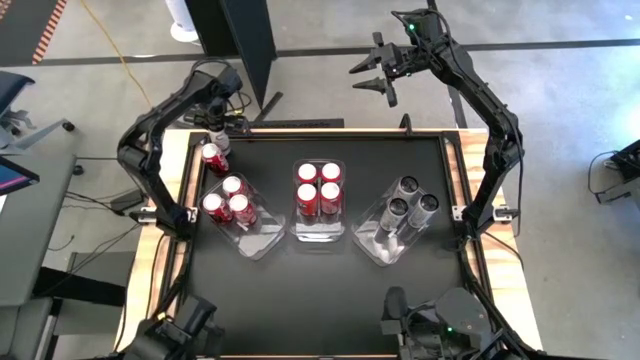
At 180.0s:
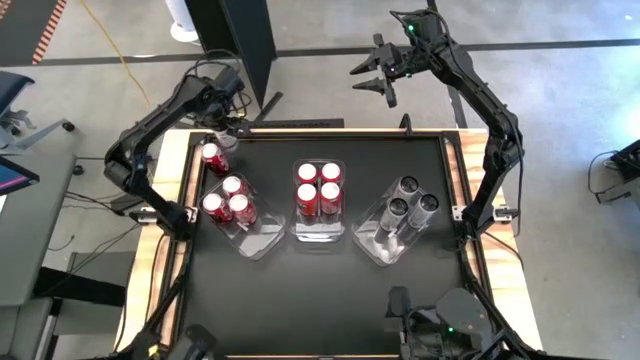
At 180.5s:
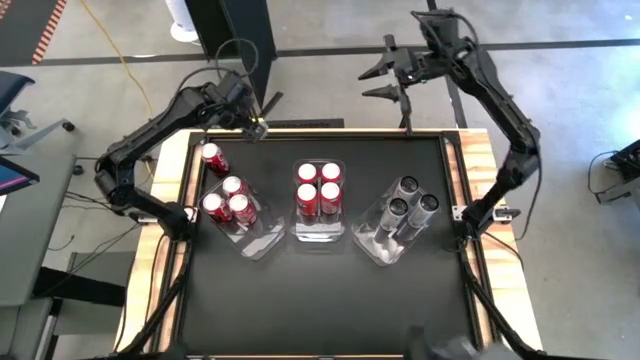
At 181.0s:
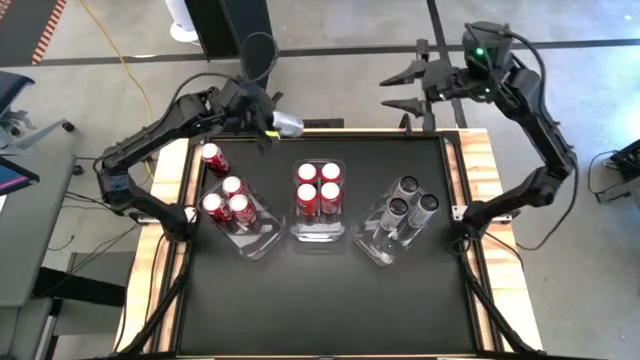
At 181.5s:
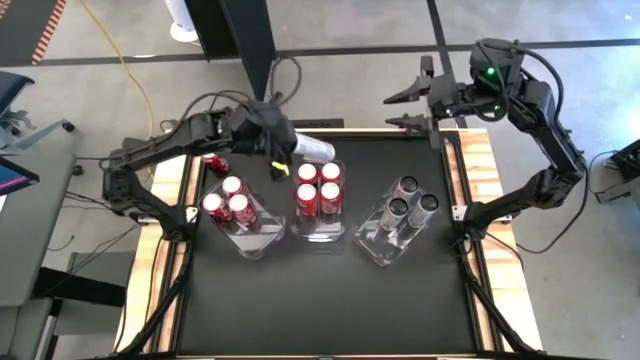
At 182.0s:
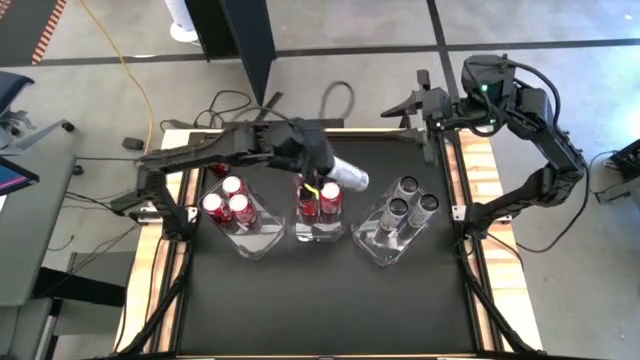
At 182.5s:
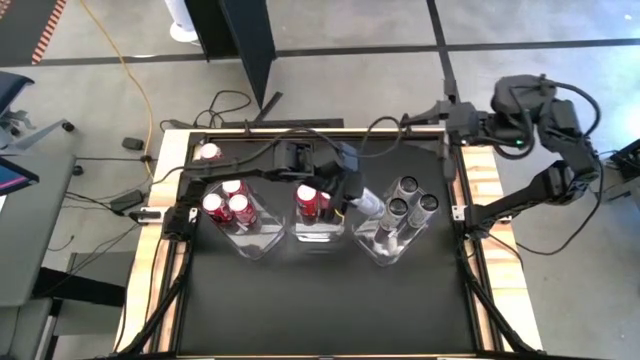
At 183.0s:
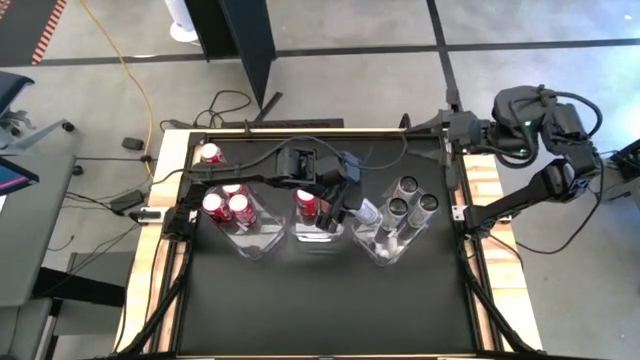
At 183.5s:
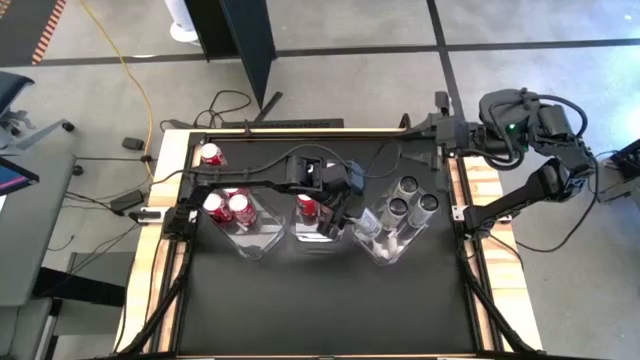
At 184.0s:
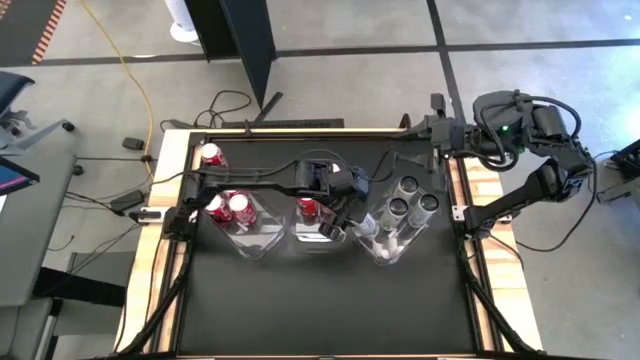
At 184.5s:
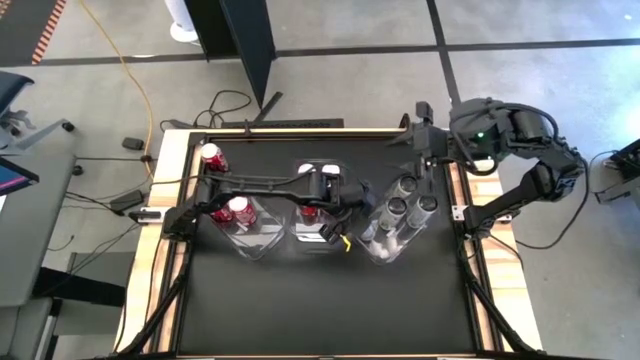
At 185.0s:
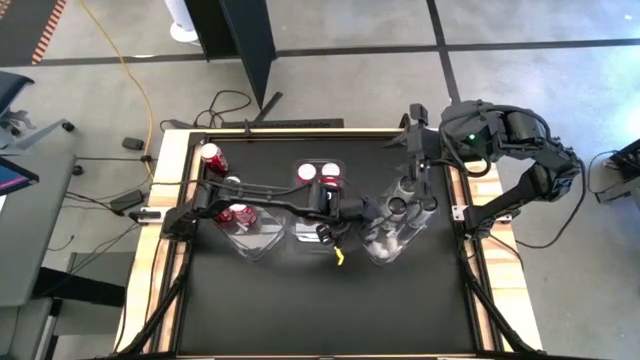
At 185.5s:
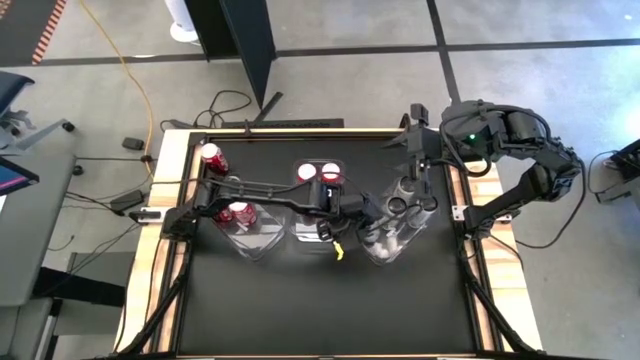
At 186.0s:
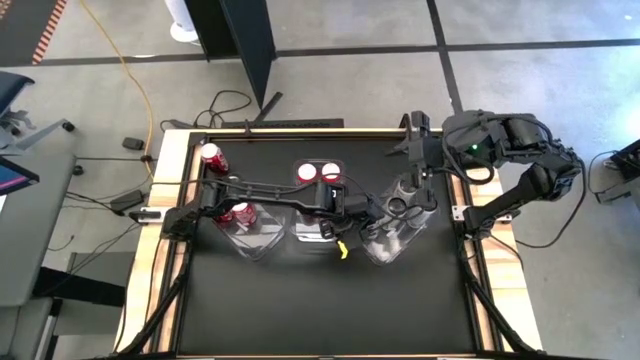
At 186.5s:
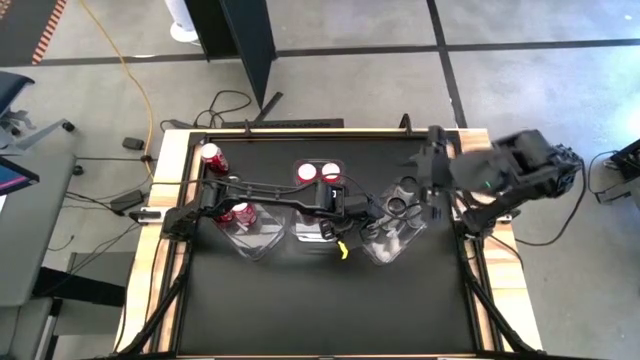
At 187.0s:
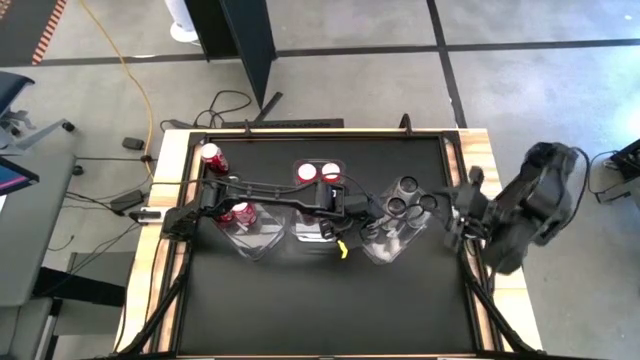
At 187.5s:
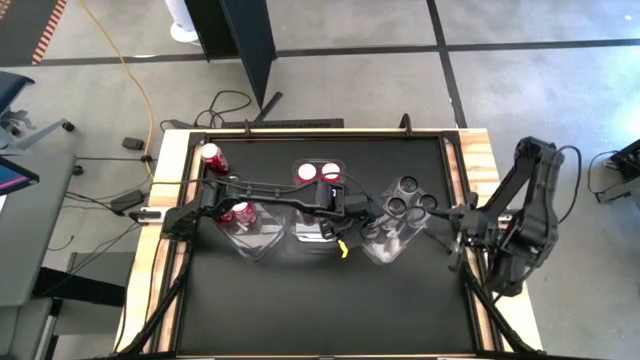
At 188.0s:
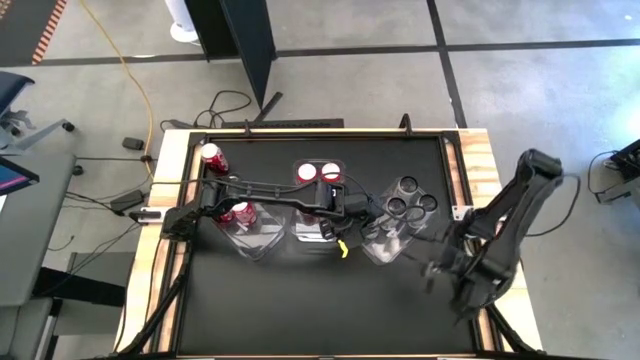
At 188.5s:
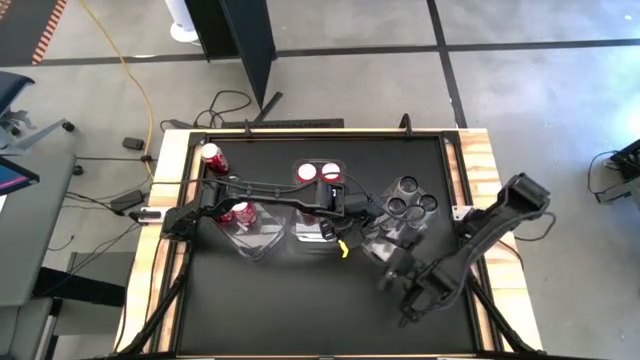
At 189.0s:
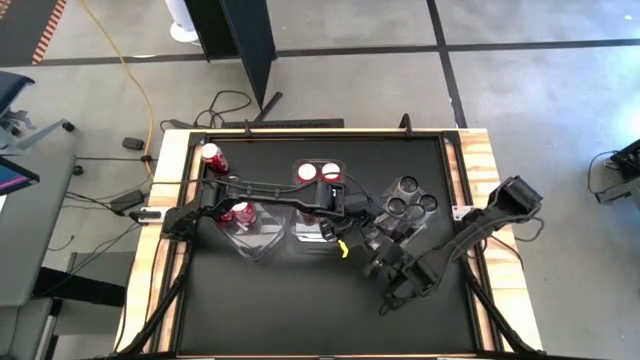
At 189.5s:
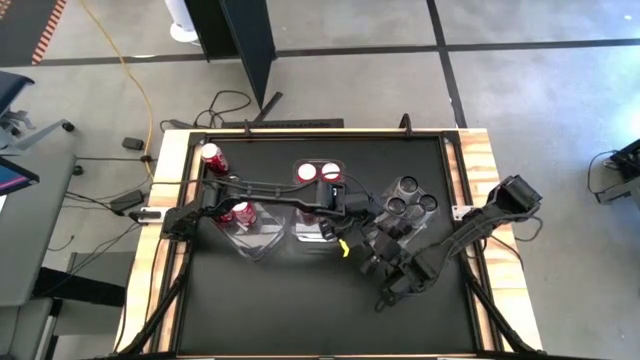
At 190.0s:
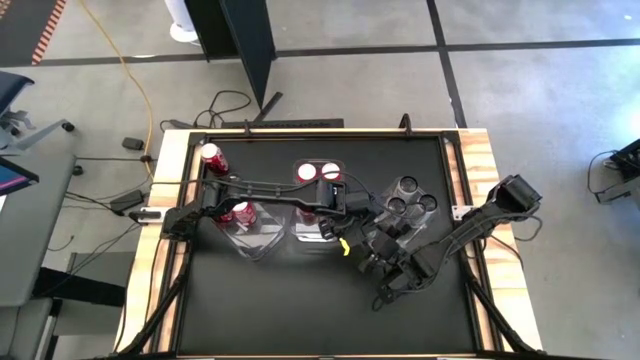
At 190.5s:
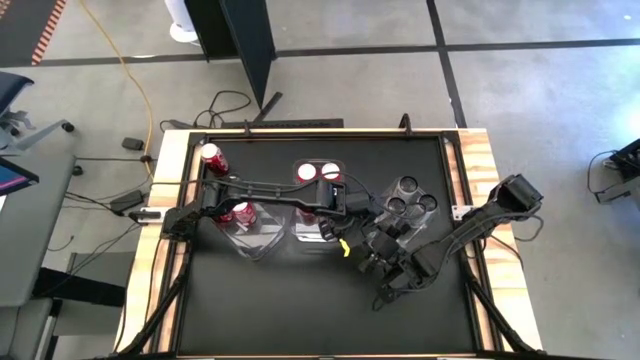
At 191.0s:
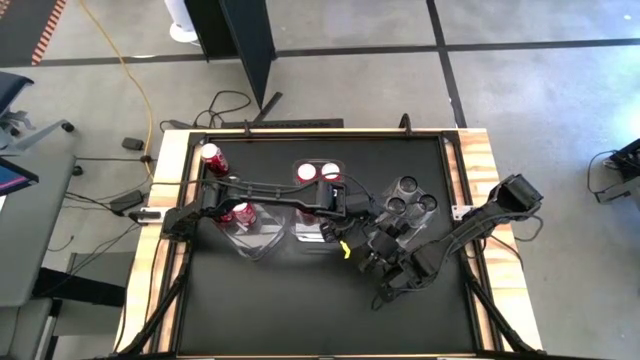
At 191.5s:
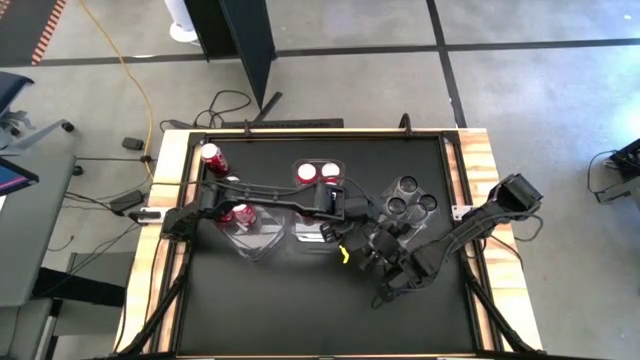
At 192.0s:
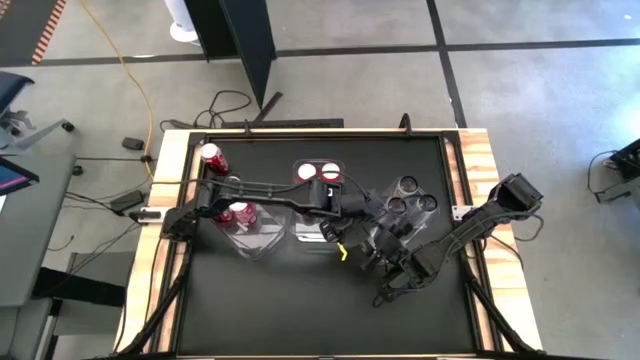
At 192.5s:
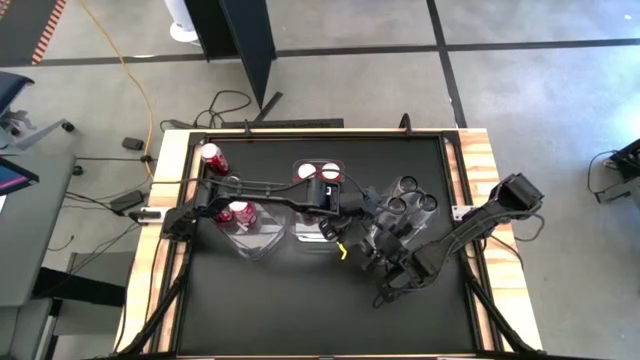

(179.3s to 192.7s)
Task: Sort soda cans
Put the white soda can into the right transparent bin

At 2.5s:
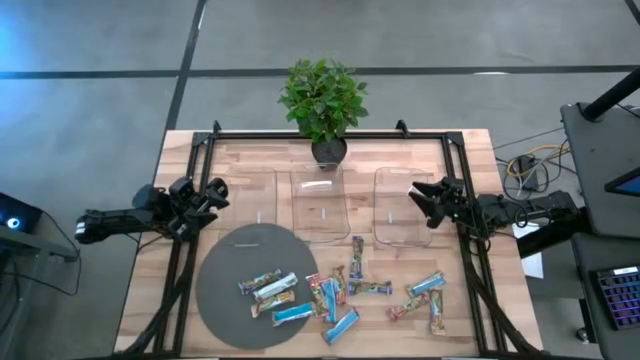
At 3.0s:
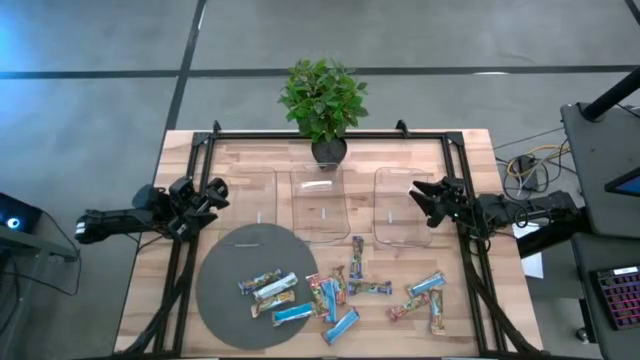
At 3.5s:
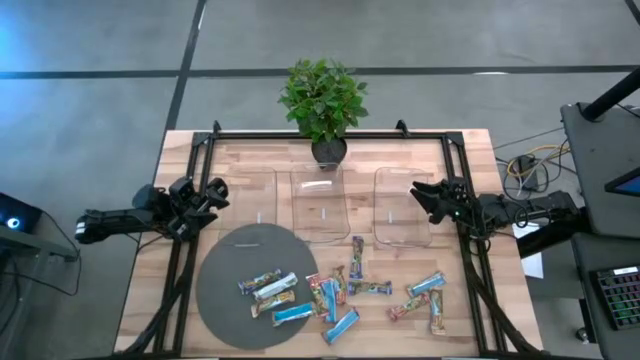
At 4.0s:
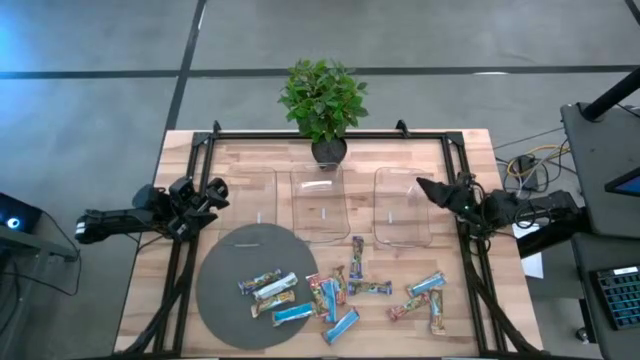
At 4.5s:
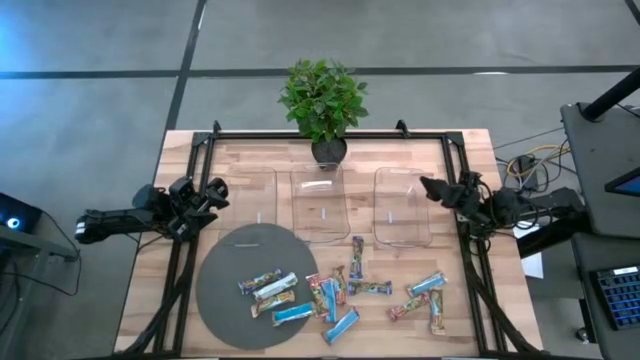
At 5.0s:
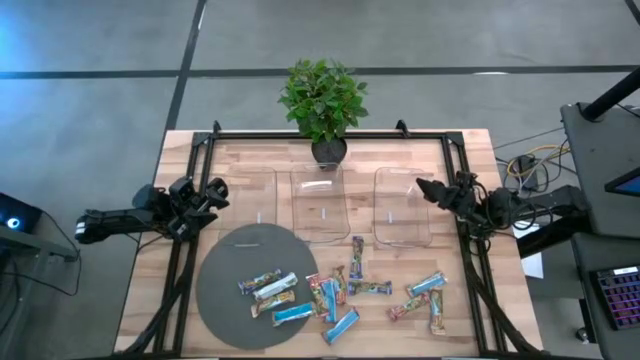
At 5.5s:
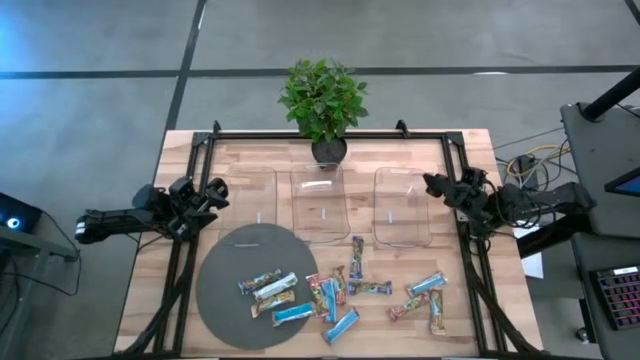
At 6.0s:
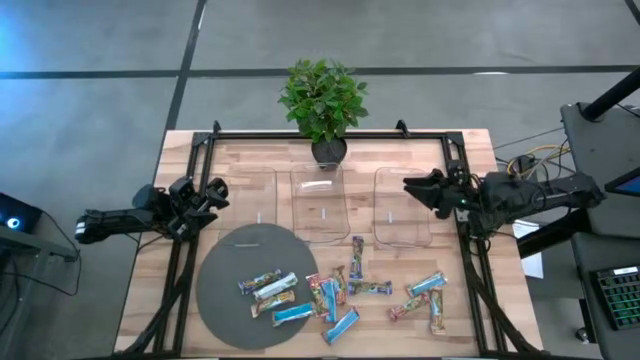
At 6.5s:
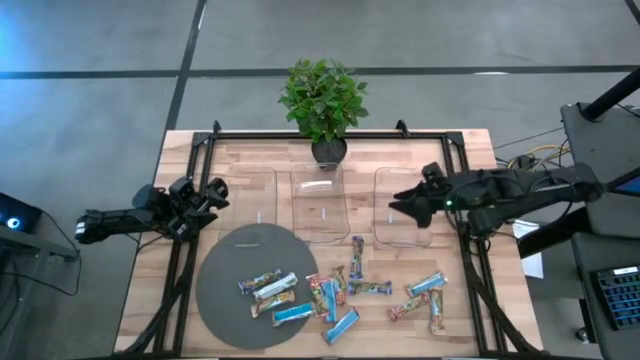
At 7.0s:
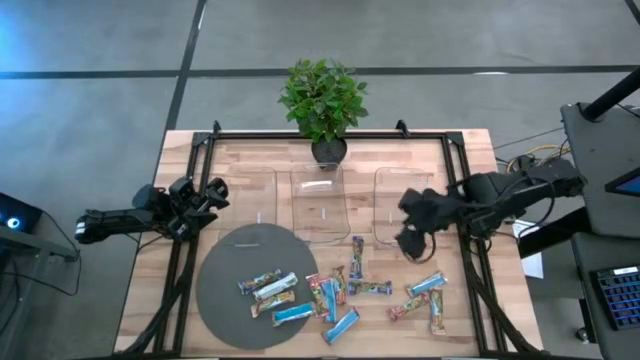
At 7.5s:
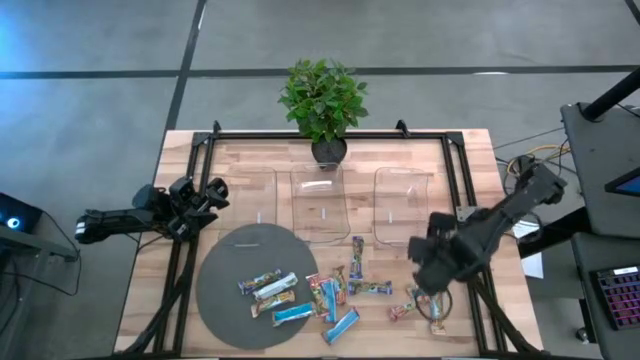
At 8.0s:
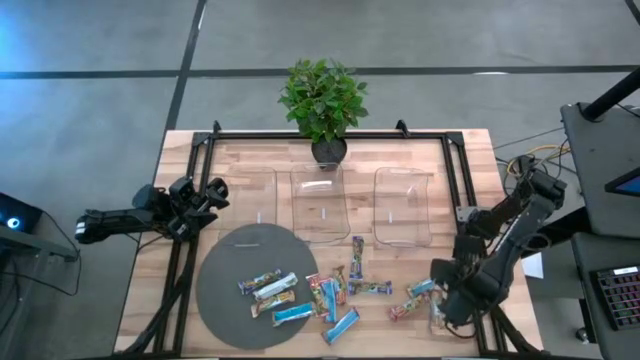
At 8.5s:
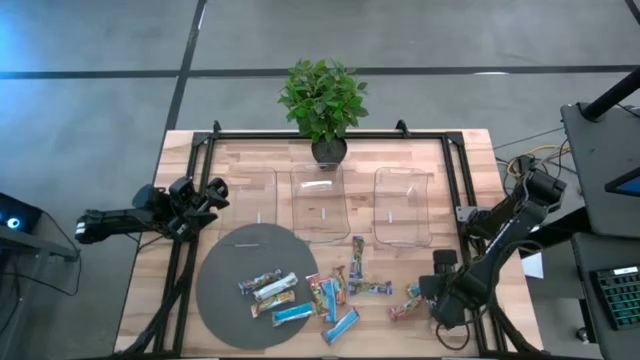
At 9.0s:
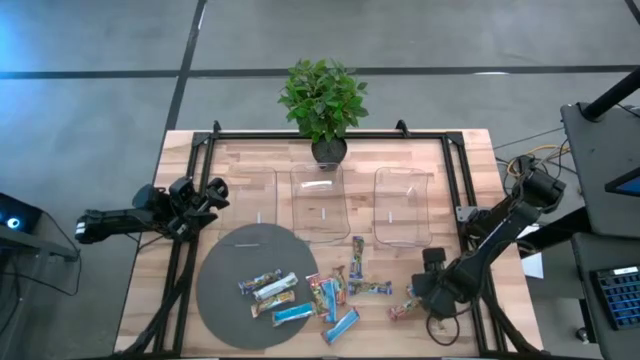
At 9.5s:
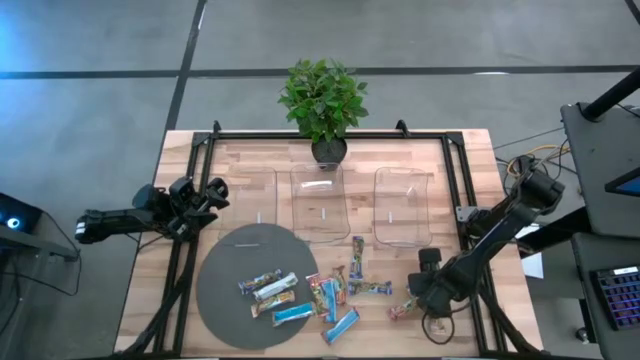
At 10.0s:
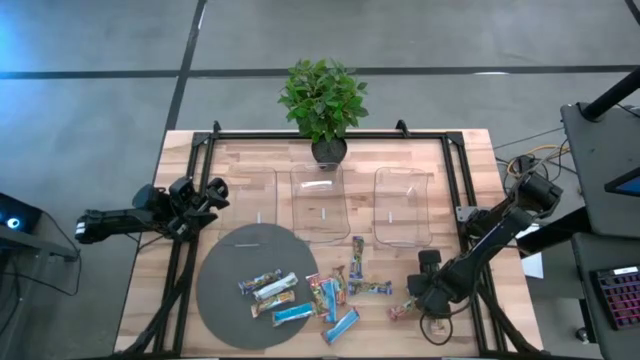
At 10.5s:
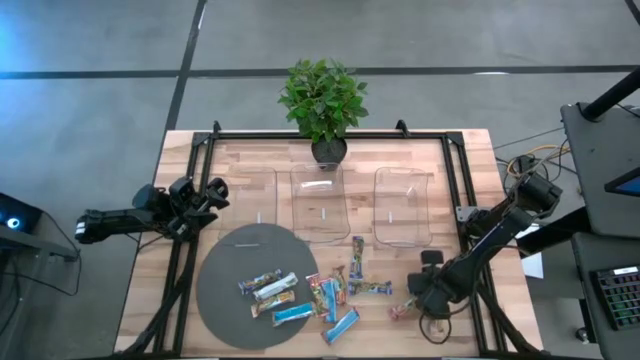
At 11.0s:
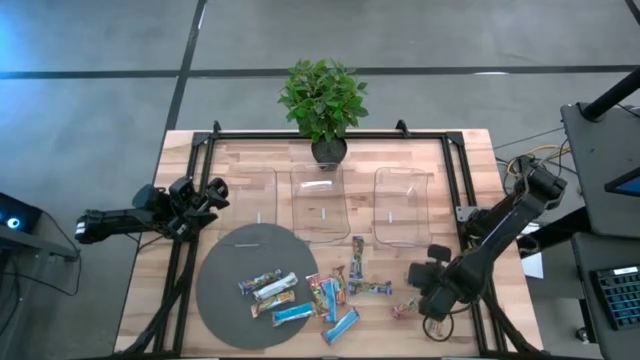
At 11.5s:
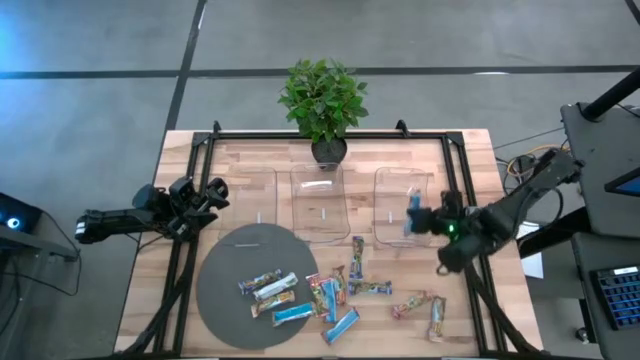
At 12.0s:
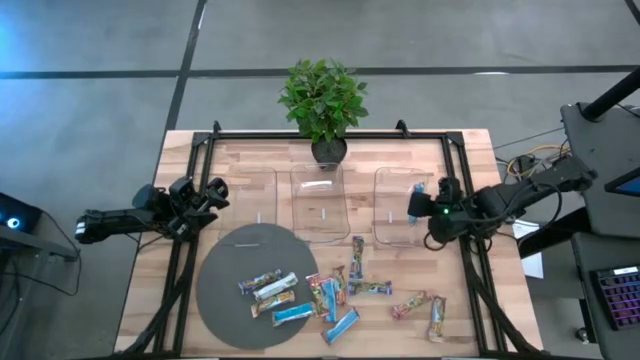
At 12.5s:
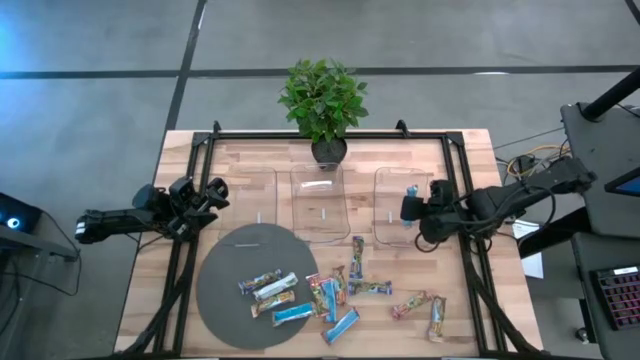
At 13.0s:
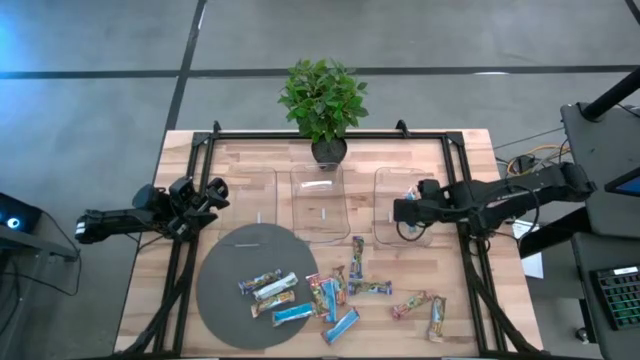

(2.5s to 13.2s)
Task: Pick and place Granola Bars by type
Put the yellow granola bar into the right transparent bin
